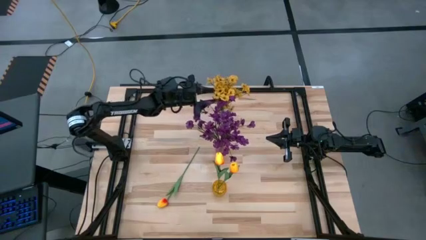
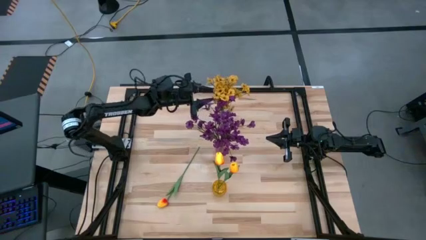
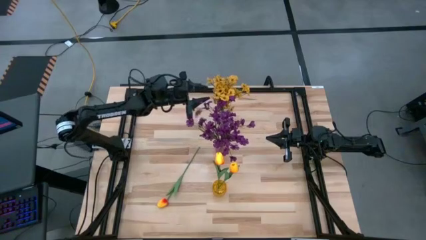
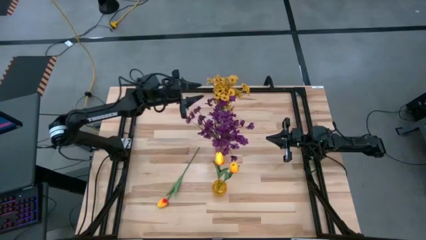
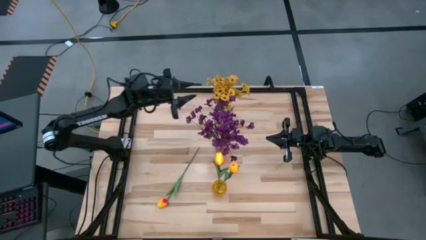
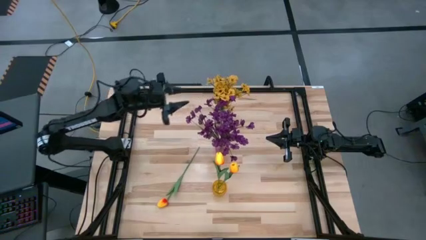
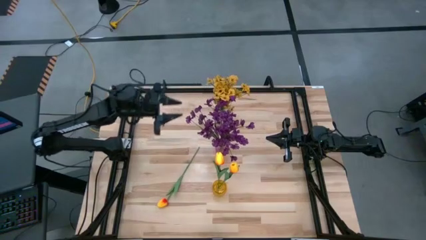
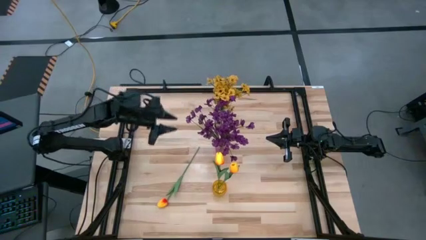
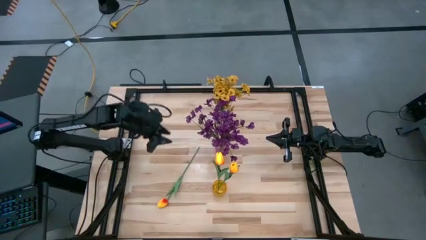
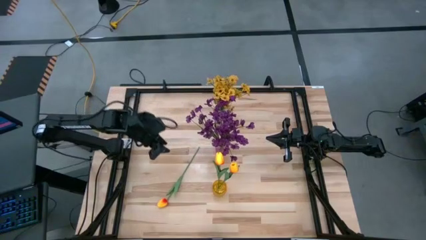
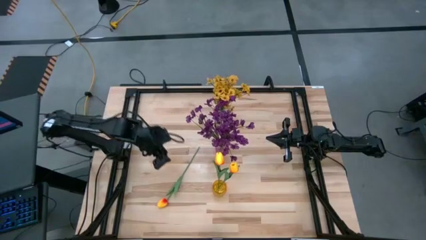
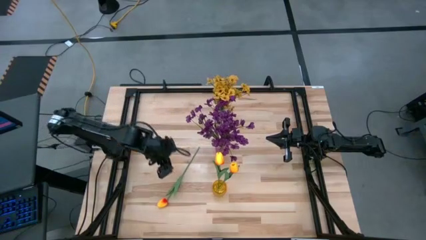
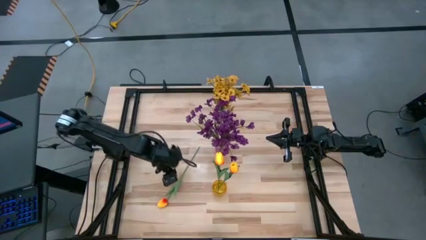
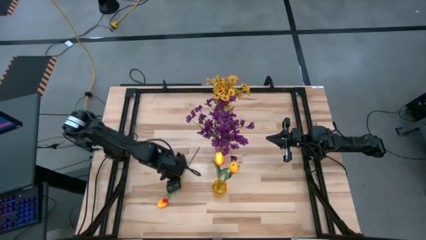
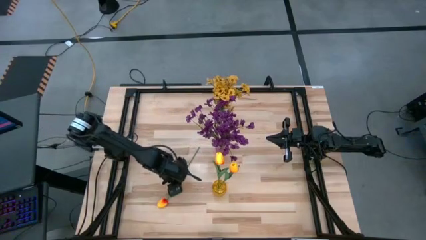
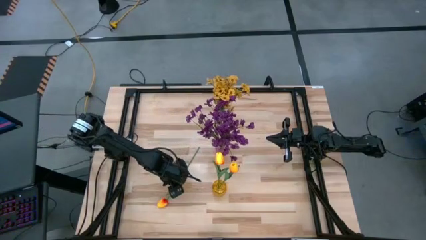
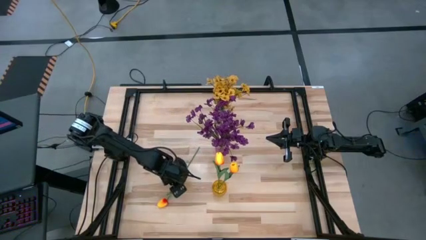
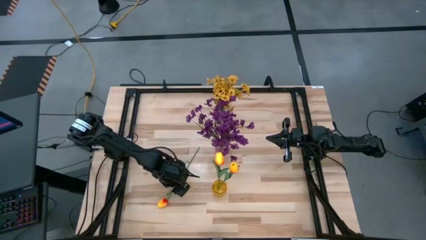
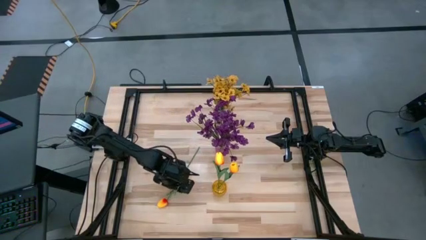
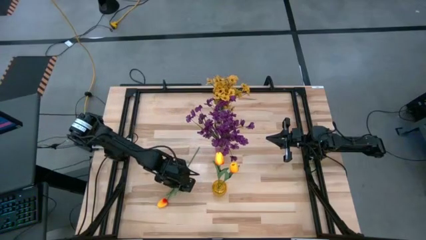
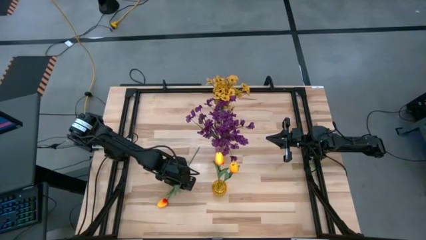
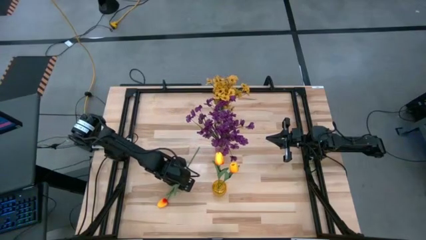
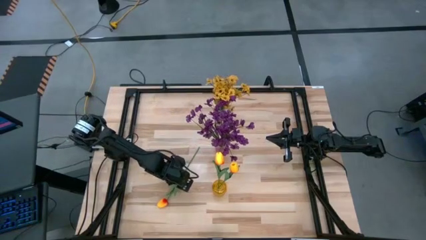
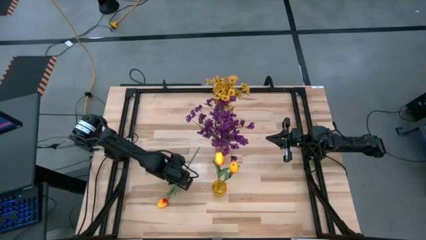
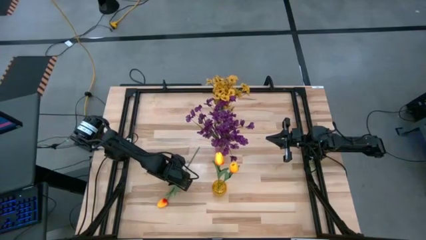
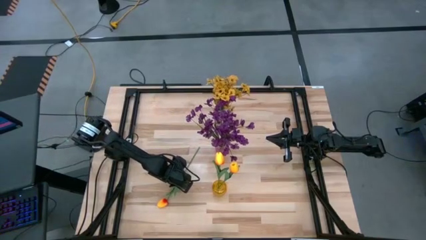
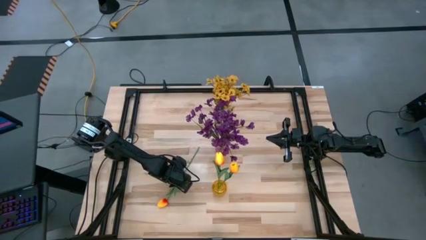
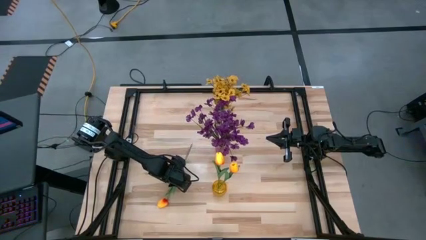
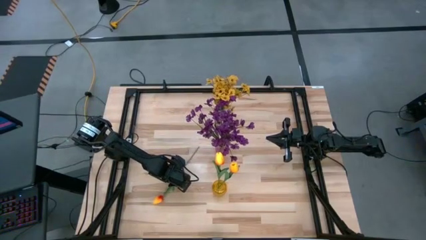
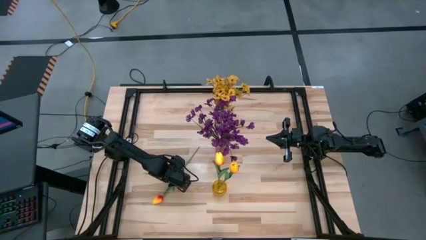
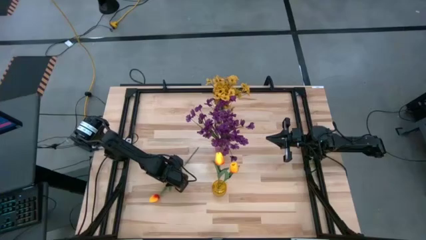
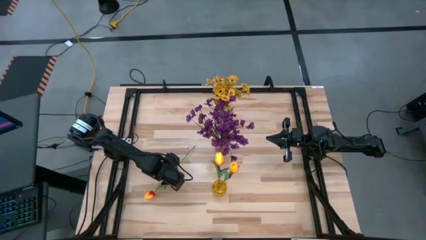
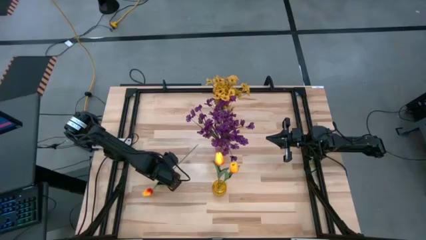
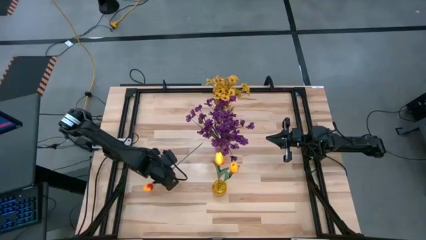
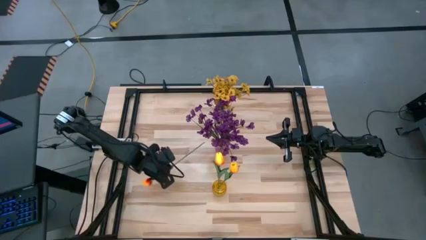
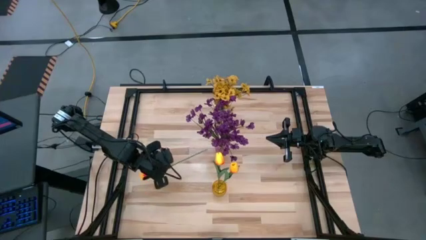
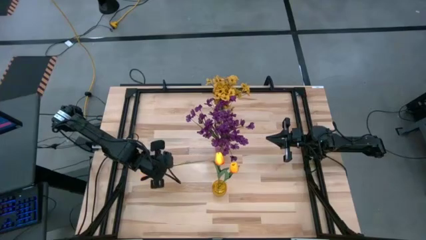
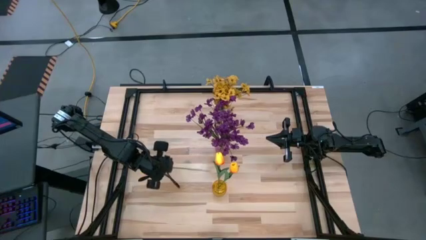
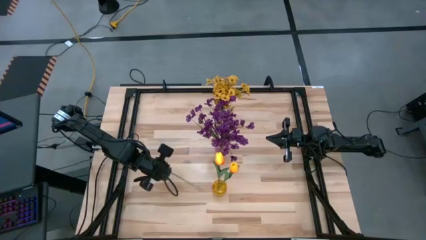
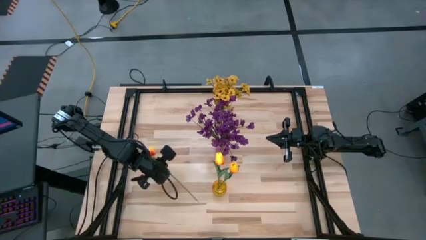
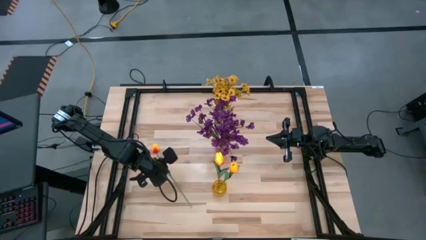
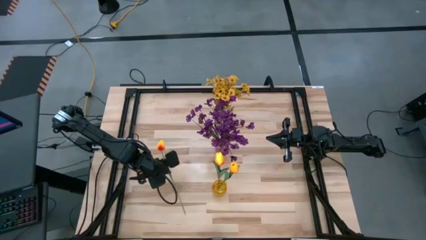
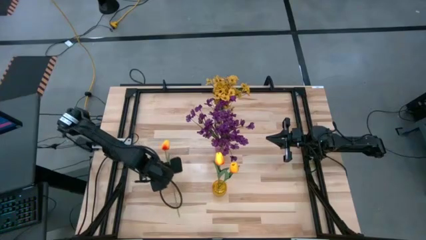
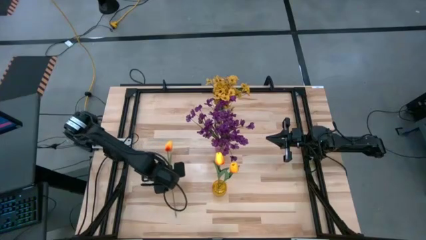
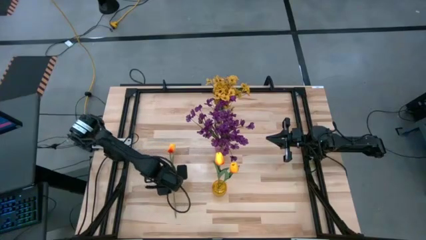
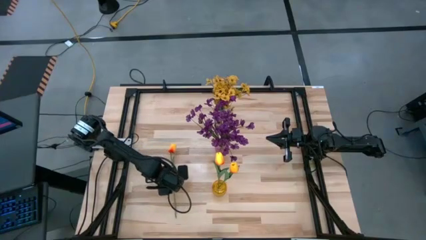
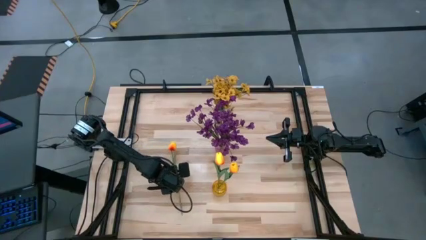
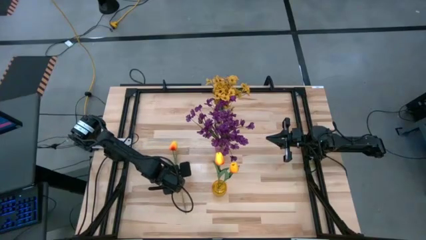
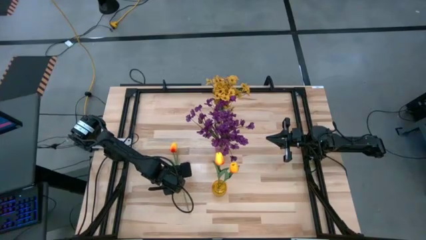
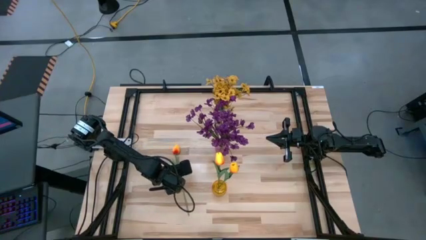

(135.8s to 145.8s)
Task: Sort flowers into vase by color
Put the yellow tulip into the yellow vase
